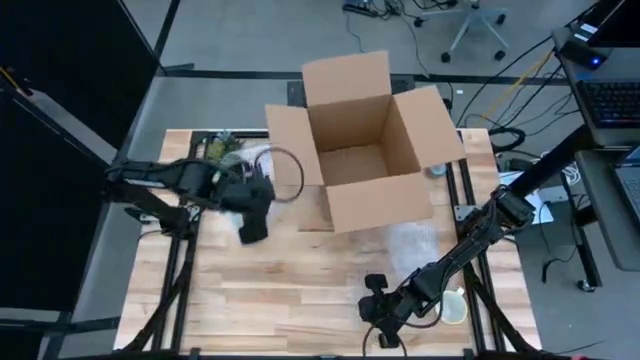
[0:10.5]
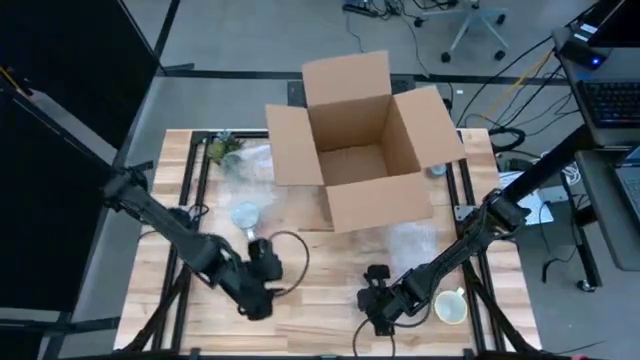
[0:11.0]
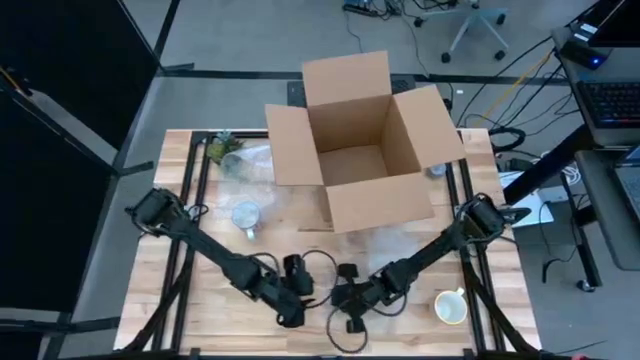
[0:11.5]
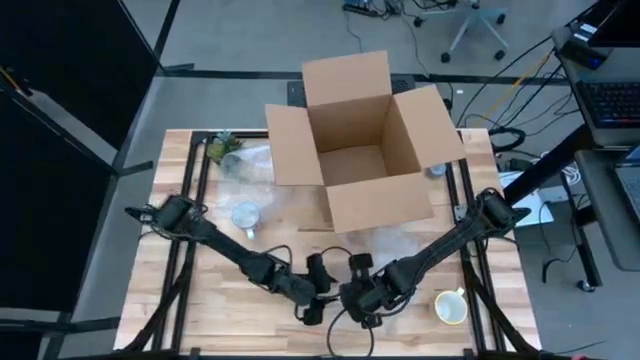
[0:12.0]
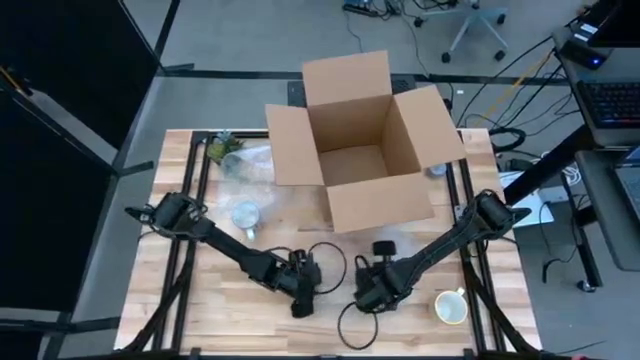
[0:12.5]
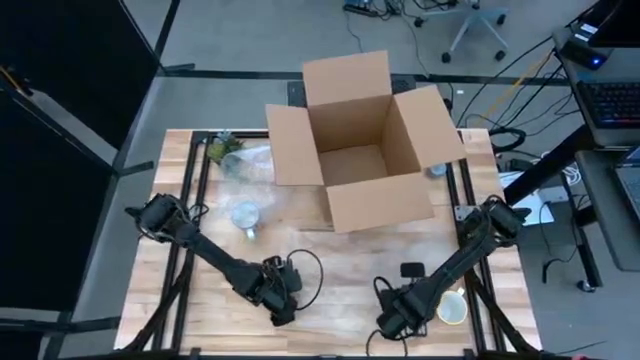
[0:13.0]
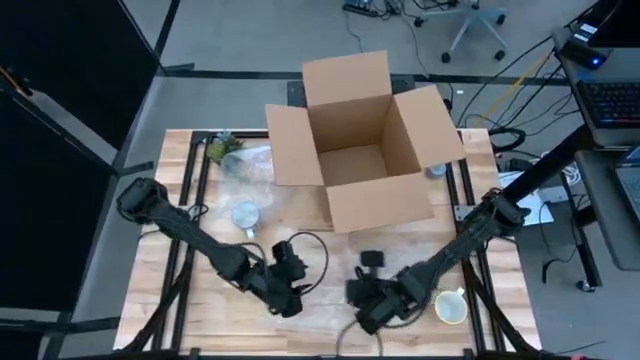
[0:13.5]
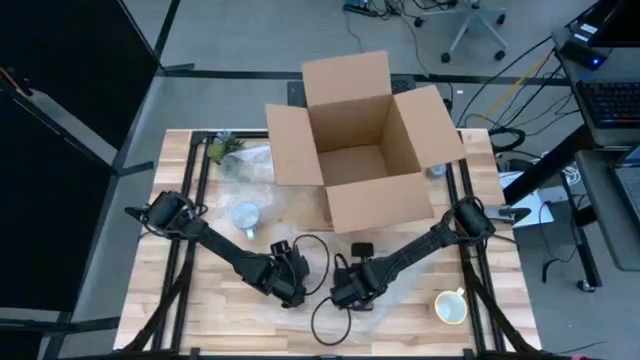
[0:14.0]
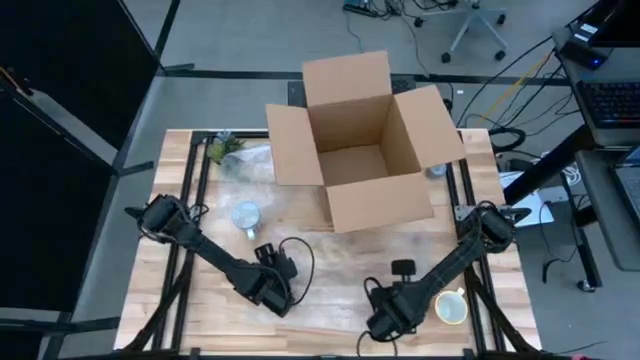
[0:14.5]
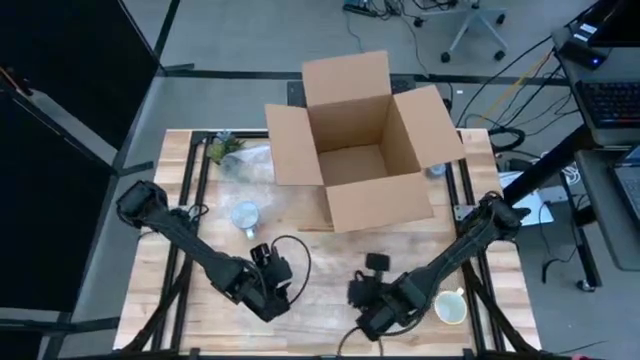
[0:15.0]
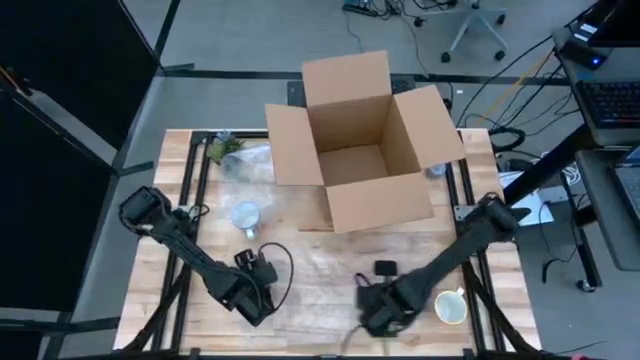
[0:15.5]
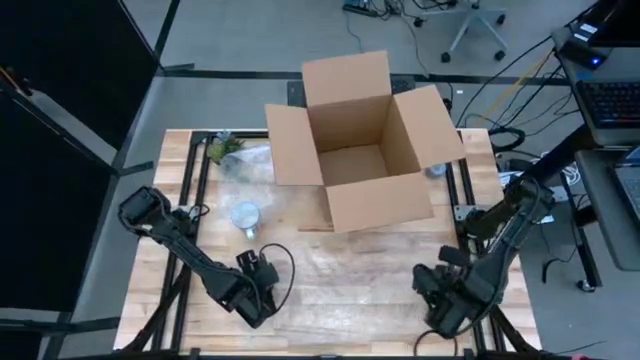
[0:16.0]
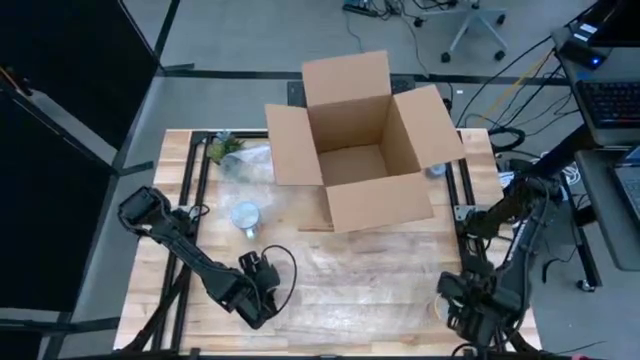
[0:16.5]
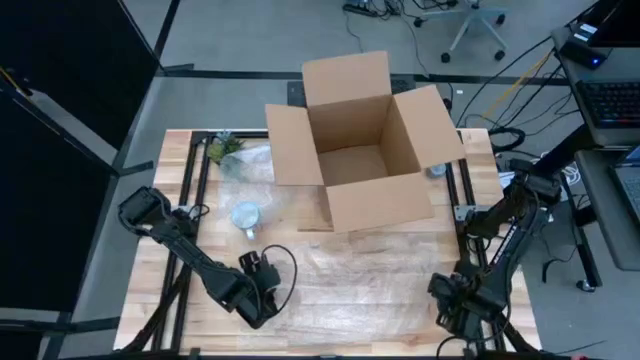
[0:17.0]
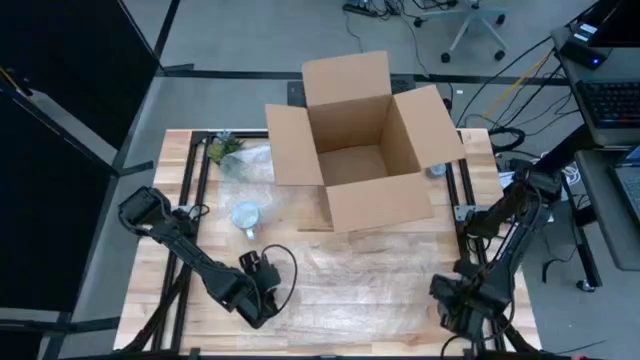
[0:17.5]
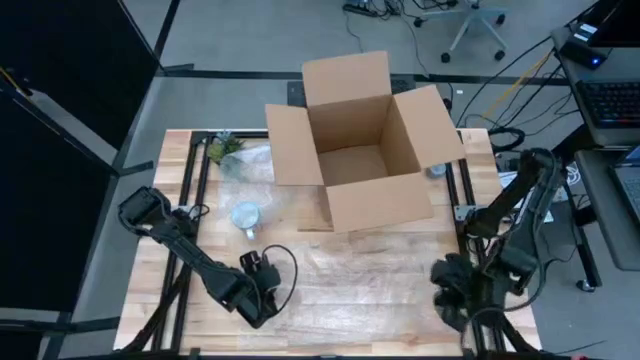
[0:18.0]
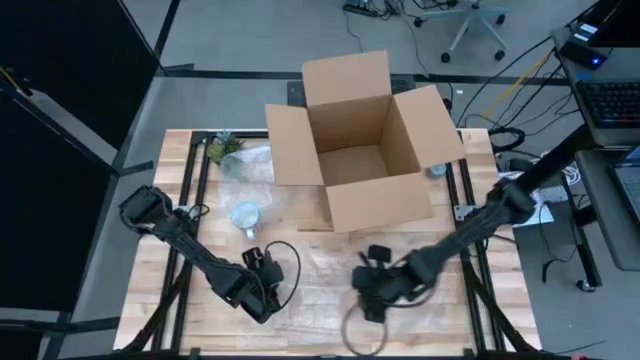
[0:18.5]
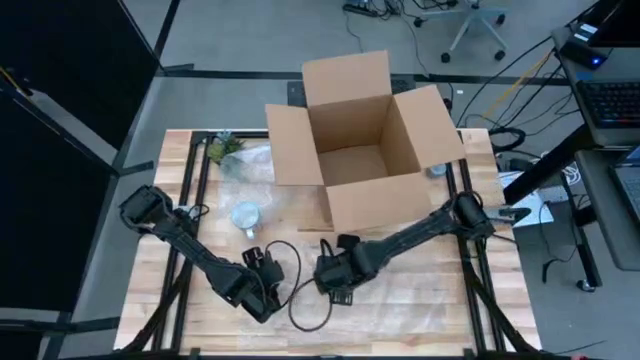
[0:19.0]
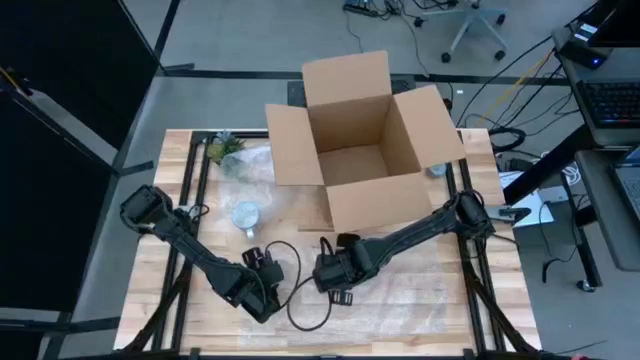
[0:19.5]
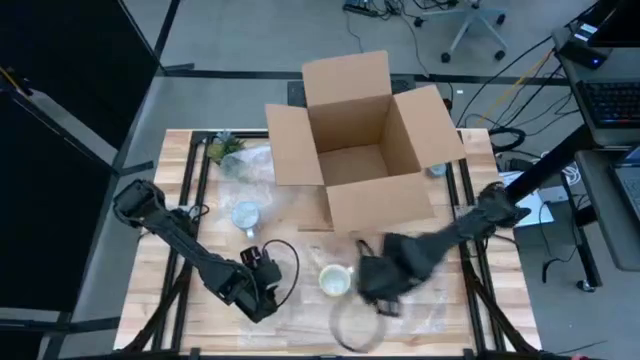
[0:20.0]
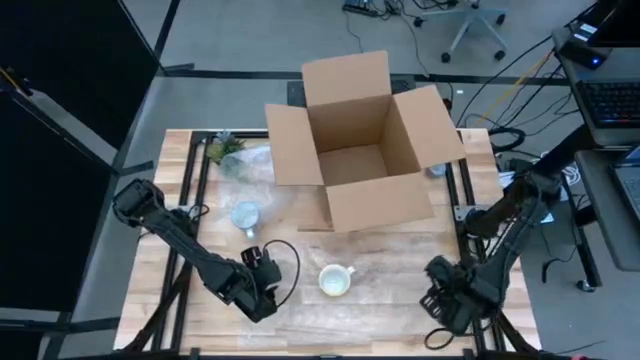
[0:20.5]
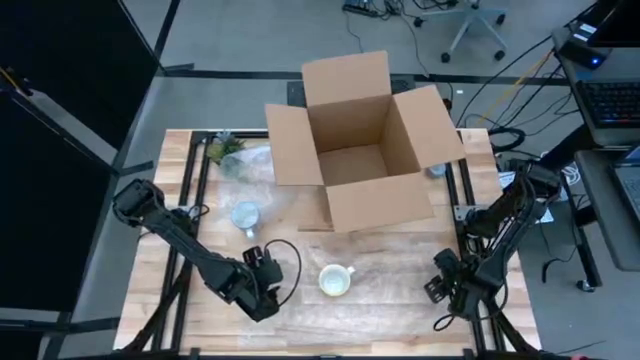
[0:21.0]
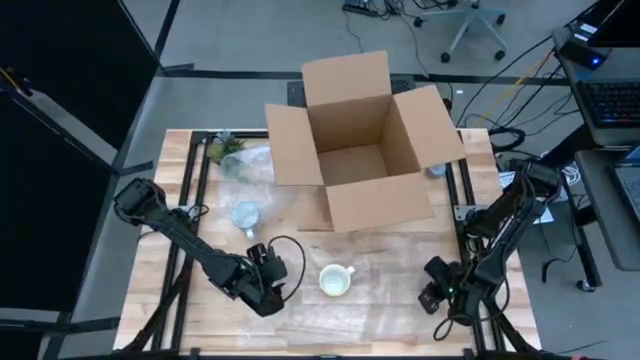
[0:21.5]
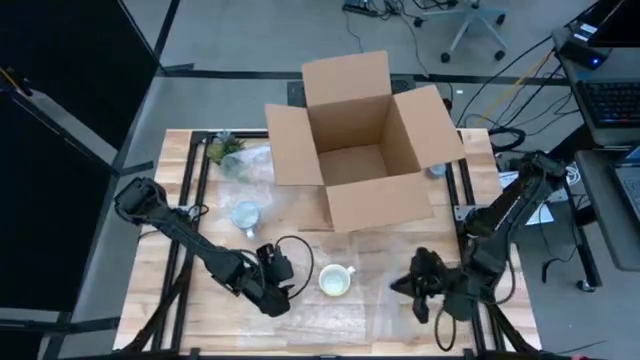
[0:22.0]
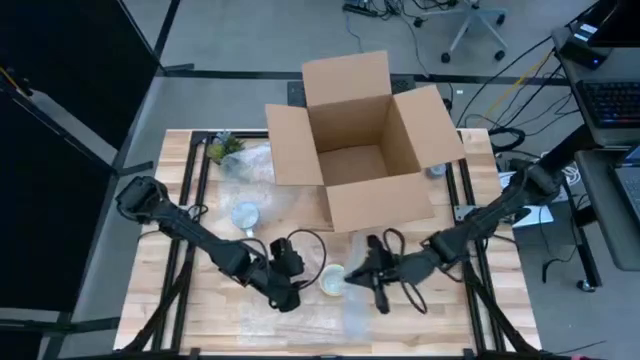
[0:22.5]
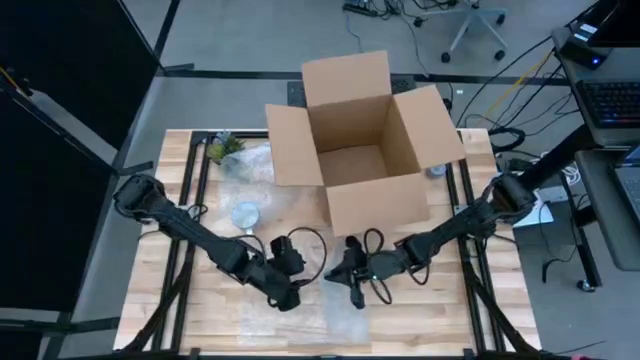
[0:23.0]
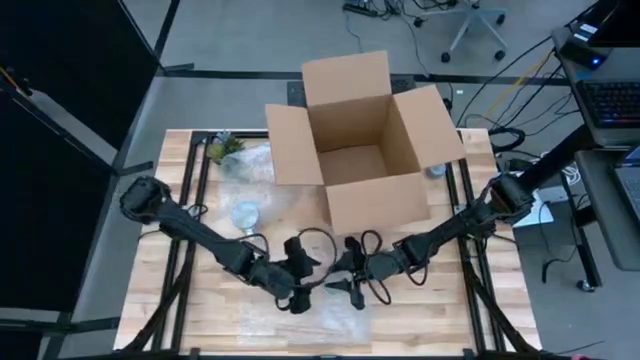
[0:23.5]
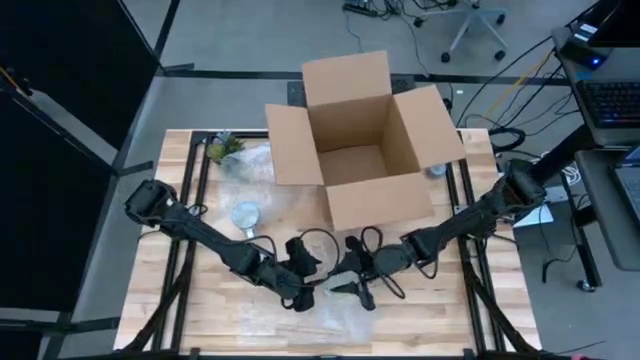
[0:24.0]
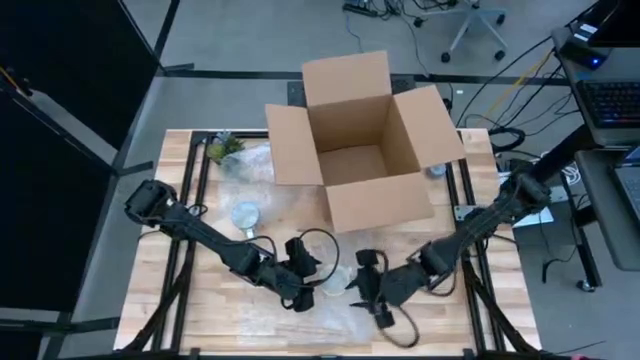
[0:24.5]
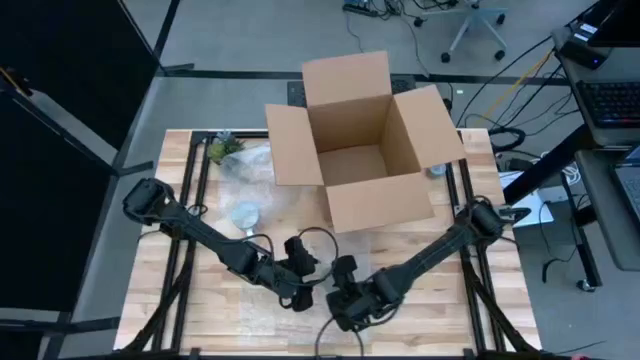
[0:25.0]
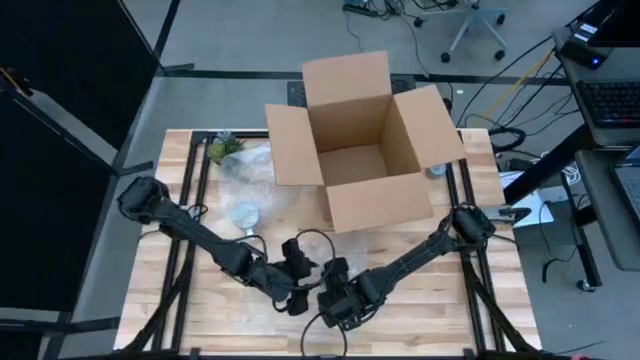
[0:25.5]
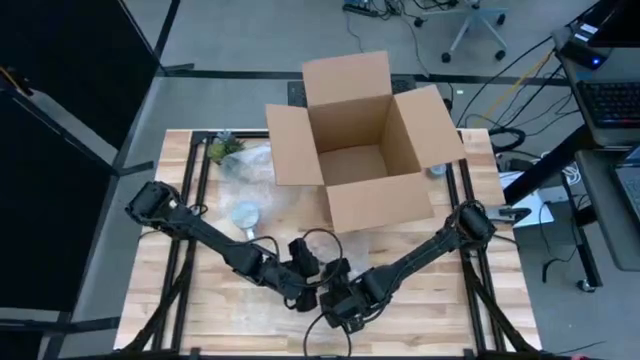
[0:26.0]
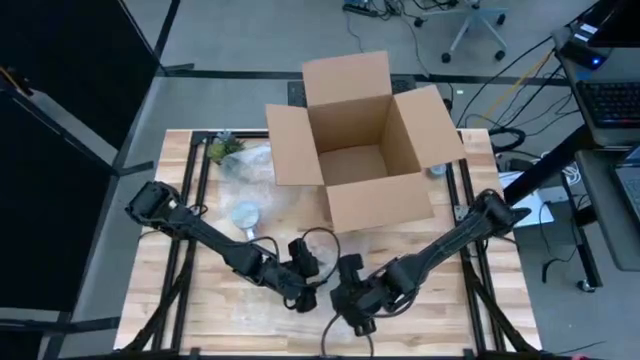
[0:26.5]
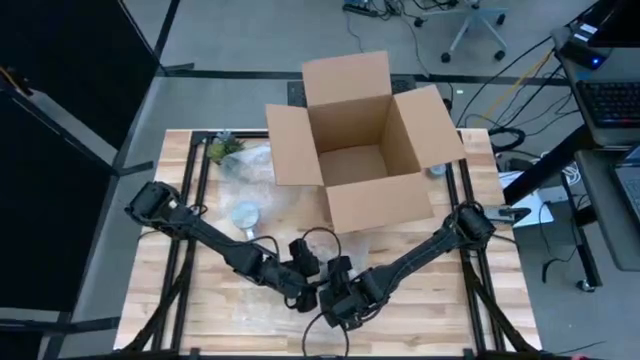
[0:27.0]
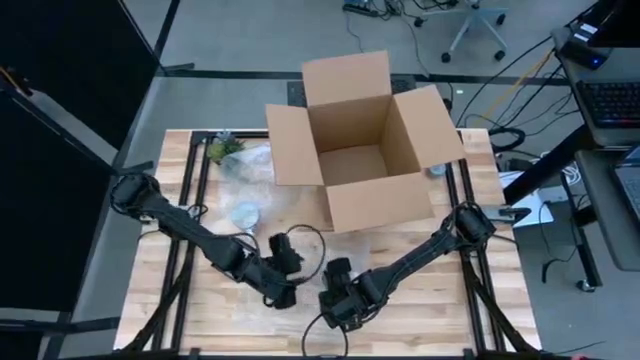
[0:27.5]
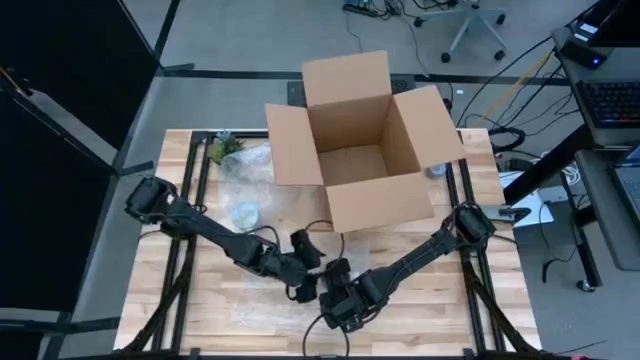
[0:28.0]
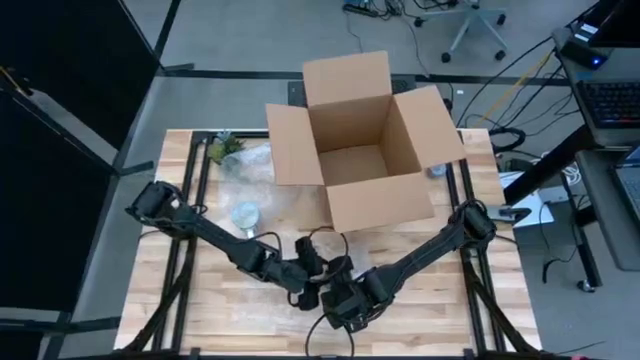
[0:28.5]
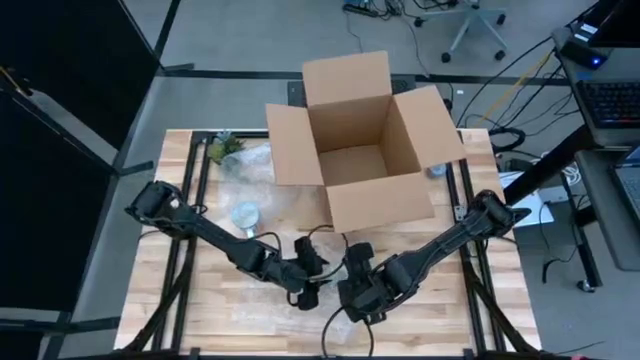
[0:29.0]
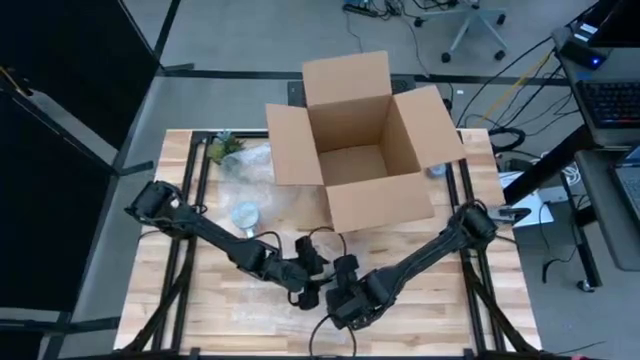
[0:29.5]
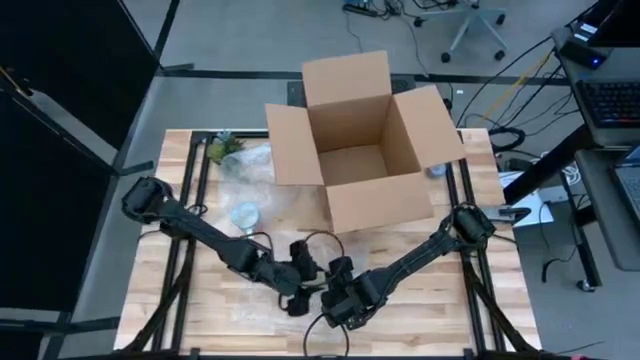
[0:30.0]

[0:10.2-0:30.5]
Task: wrap mug
Wrap the yellow mug with the bubble wrap
